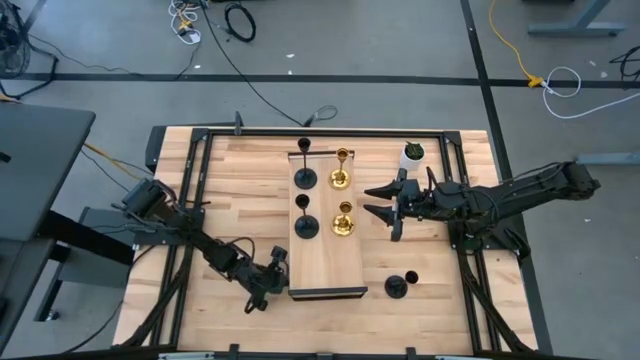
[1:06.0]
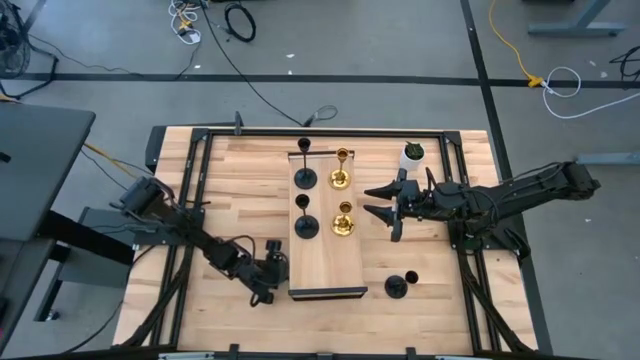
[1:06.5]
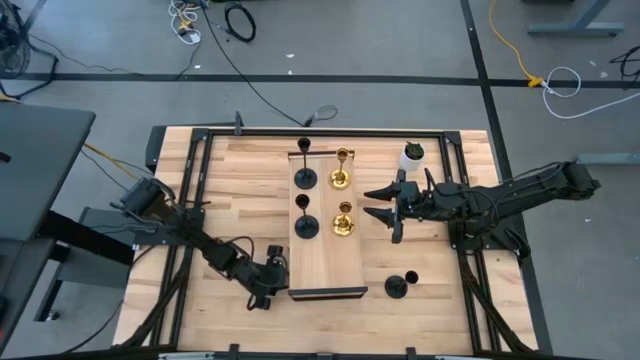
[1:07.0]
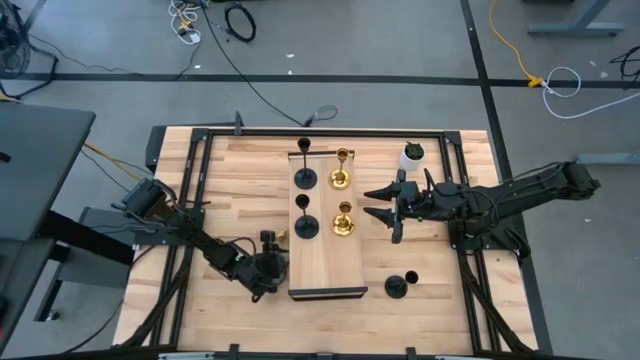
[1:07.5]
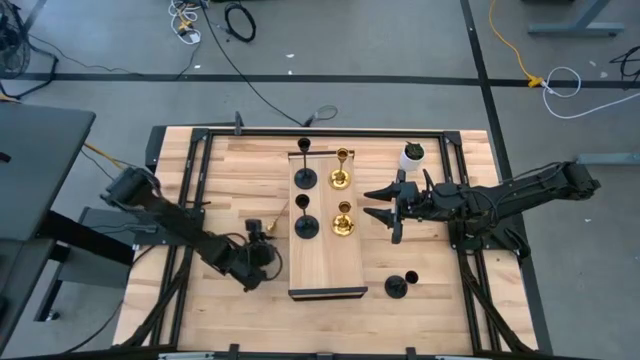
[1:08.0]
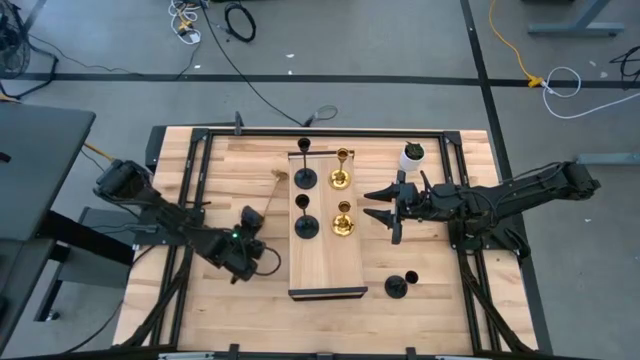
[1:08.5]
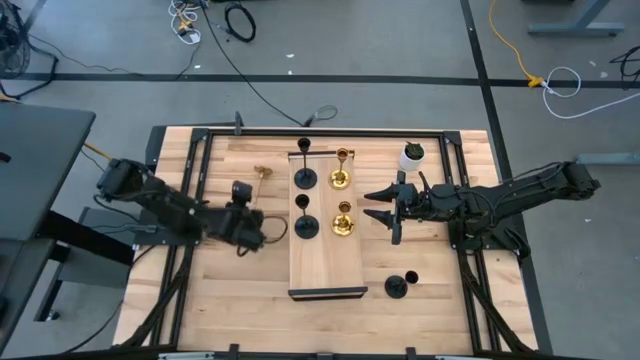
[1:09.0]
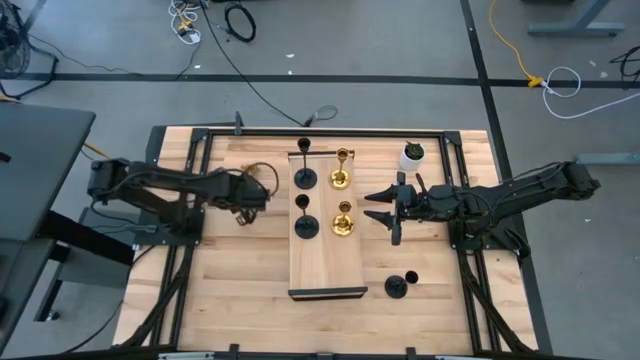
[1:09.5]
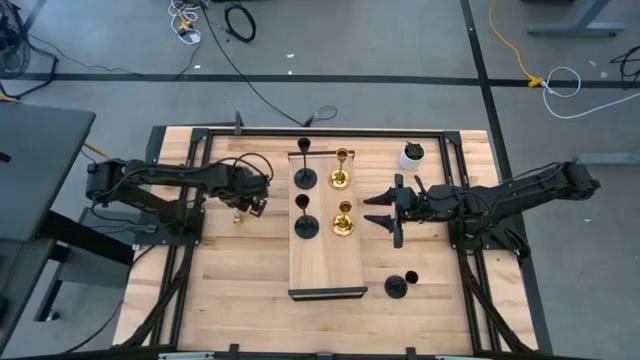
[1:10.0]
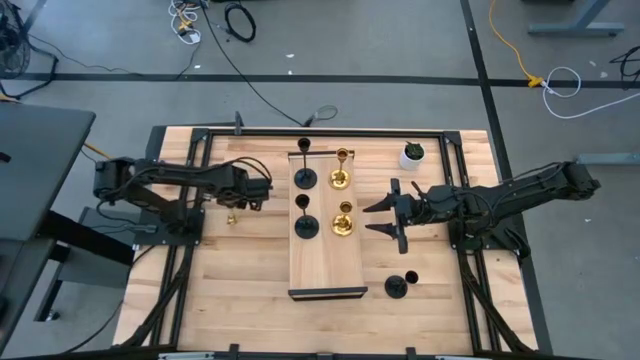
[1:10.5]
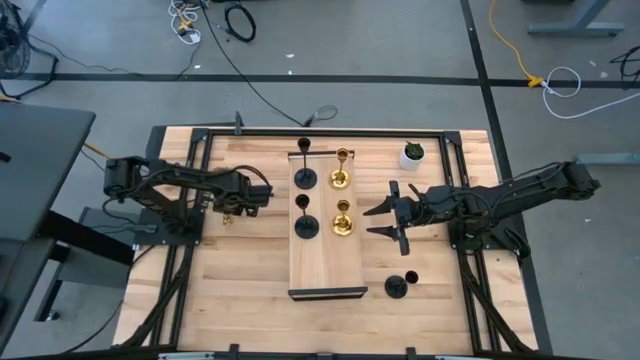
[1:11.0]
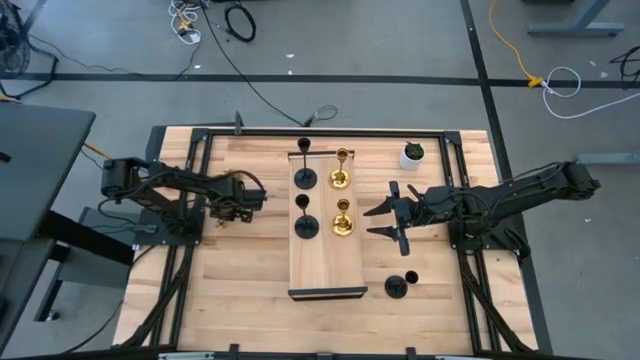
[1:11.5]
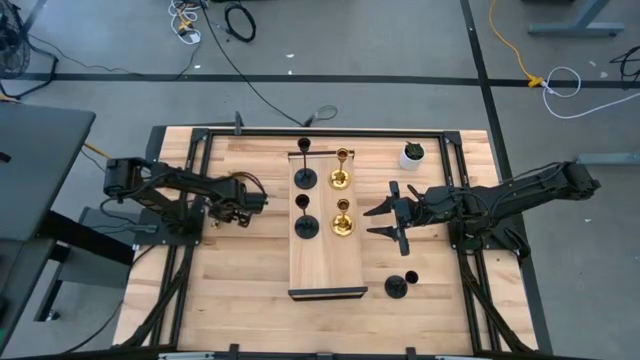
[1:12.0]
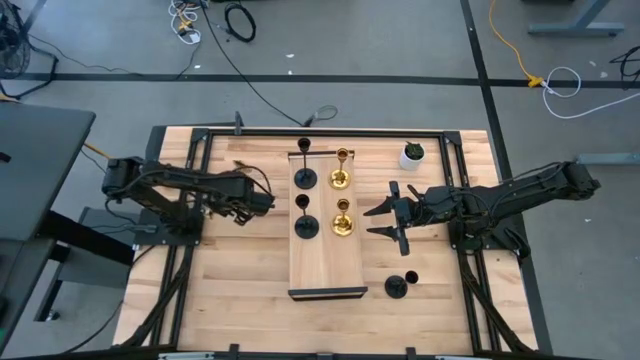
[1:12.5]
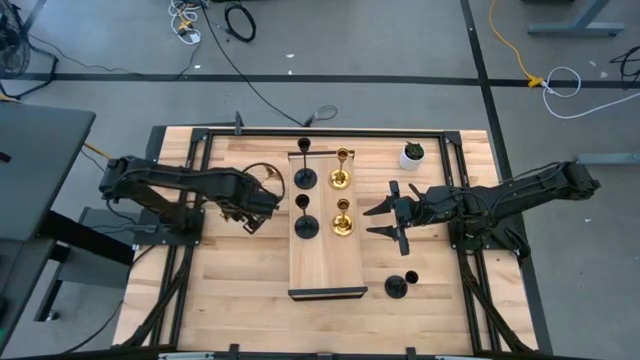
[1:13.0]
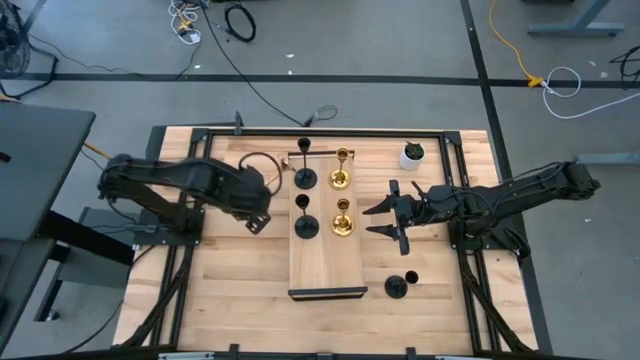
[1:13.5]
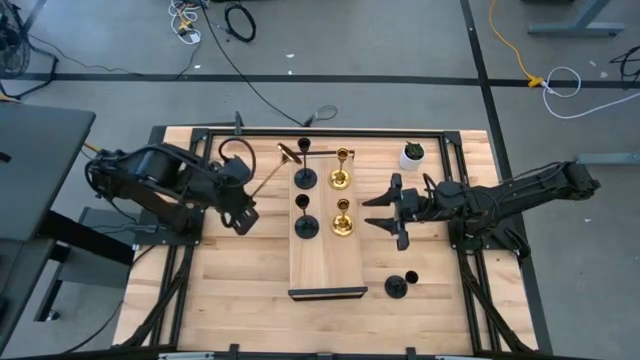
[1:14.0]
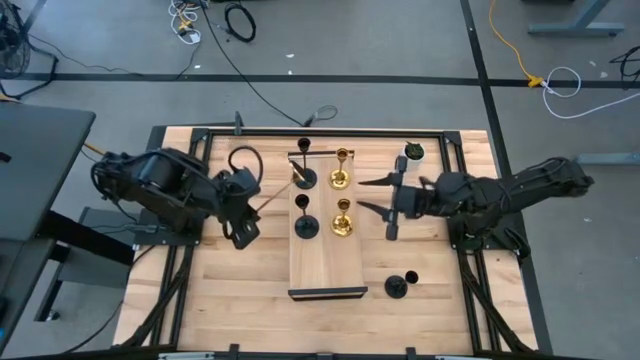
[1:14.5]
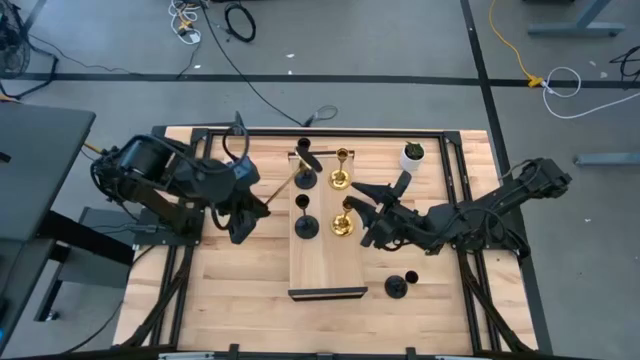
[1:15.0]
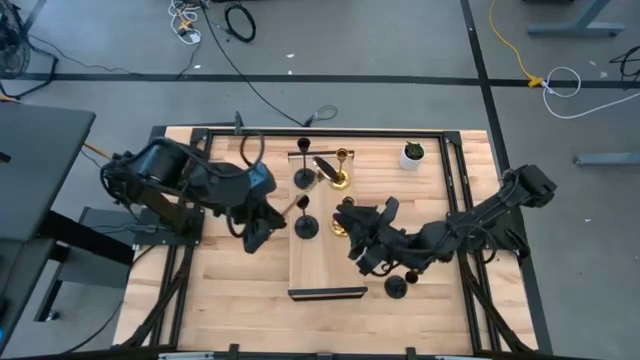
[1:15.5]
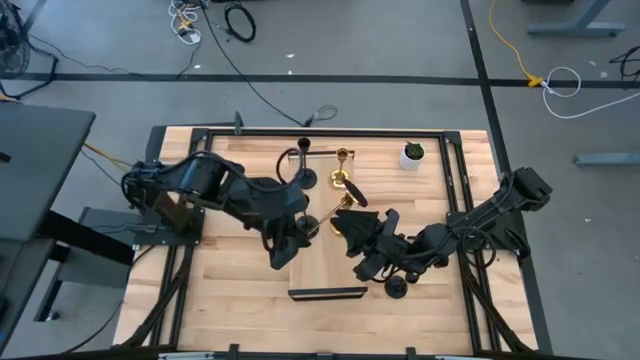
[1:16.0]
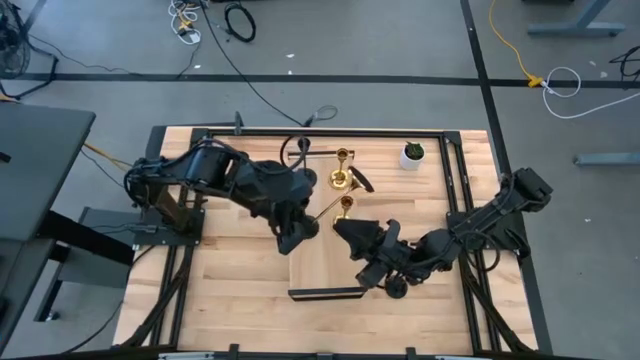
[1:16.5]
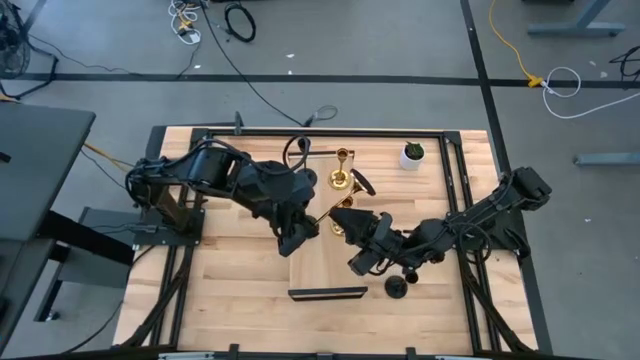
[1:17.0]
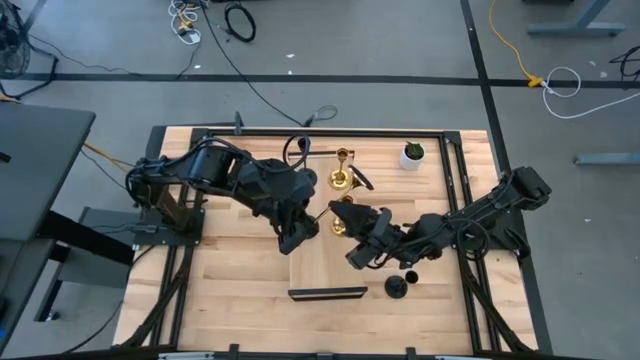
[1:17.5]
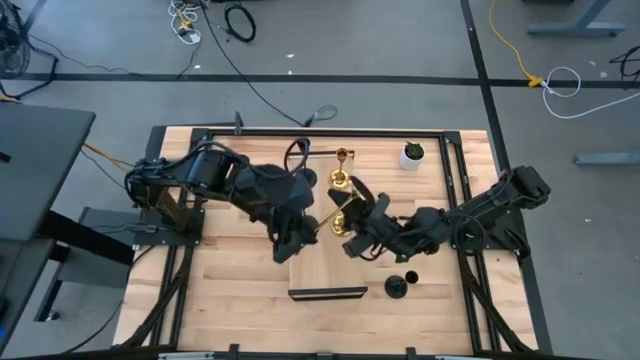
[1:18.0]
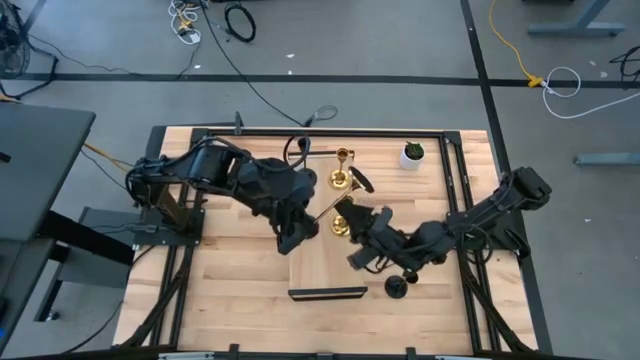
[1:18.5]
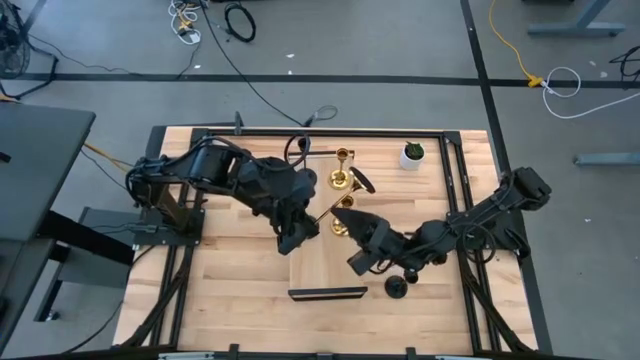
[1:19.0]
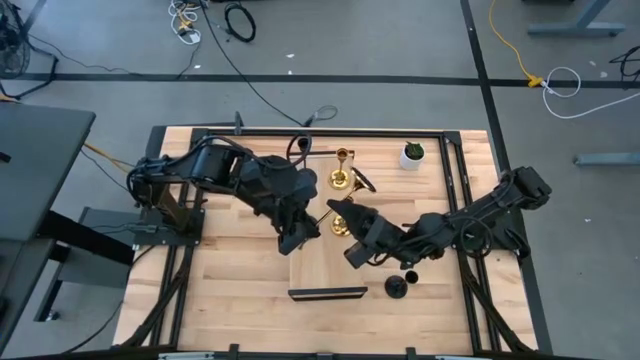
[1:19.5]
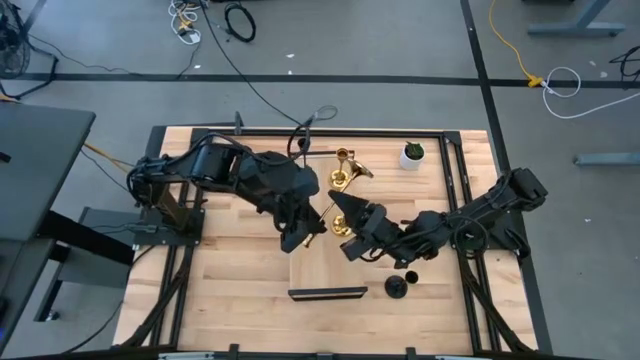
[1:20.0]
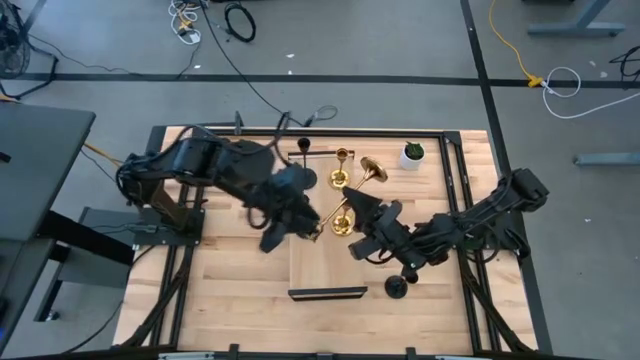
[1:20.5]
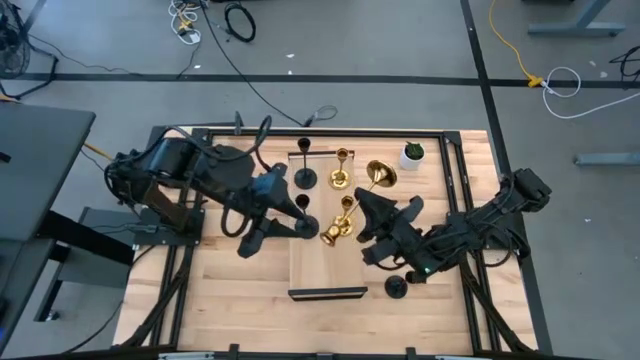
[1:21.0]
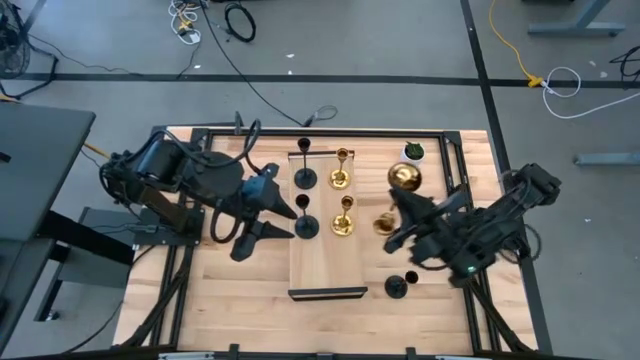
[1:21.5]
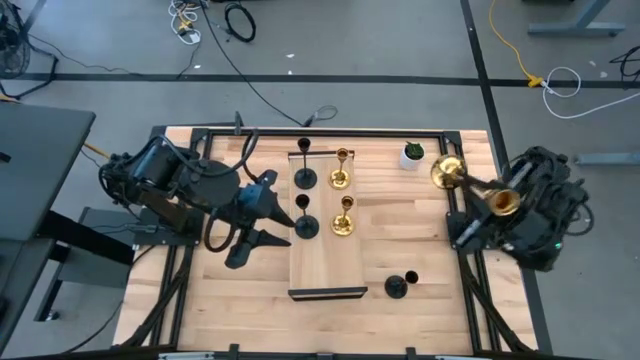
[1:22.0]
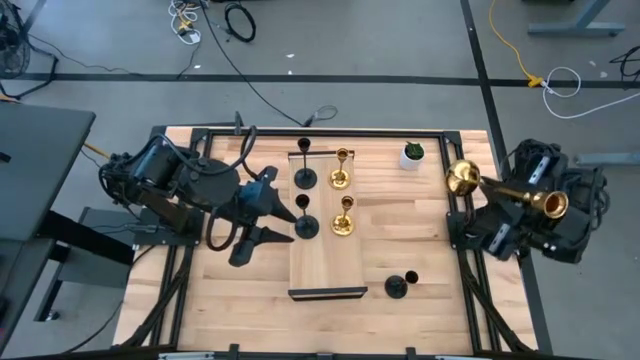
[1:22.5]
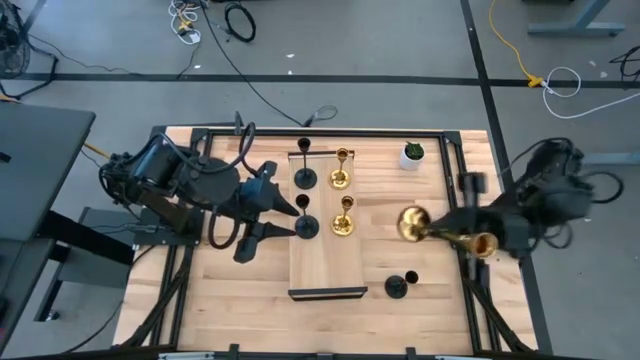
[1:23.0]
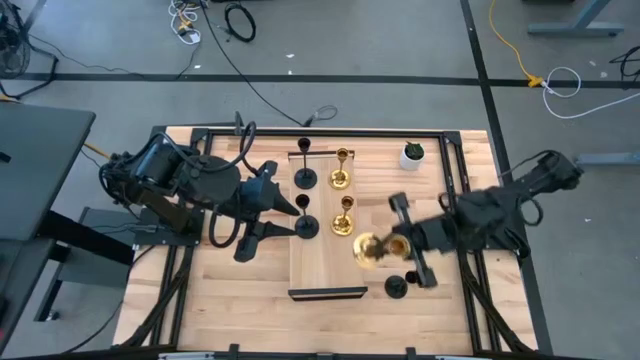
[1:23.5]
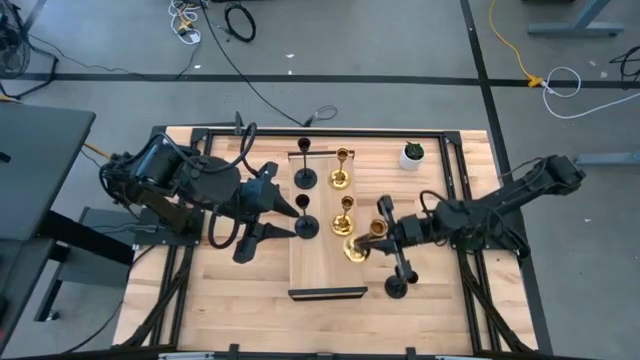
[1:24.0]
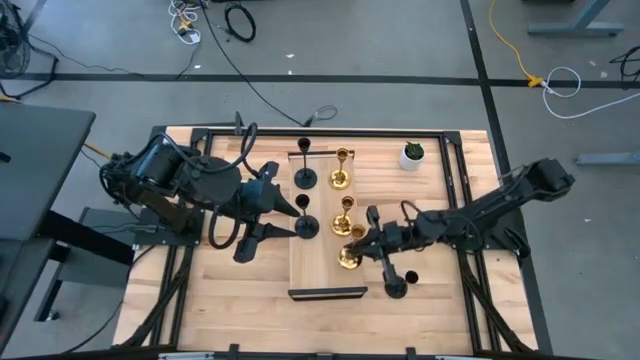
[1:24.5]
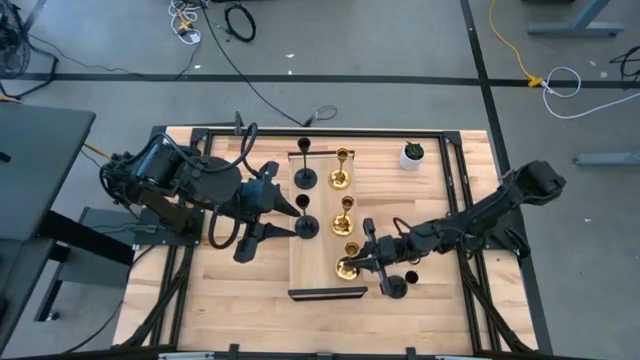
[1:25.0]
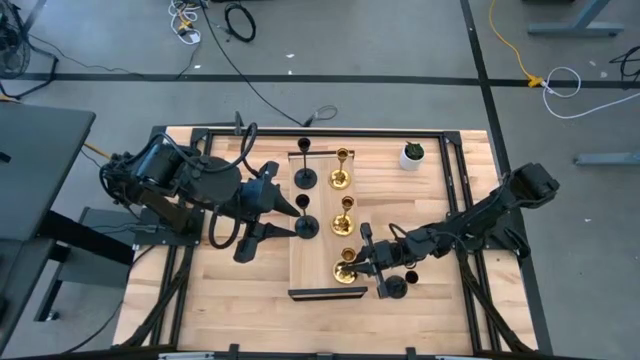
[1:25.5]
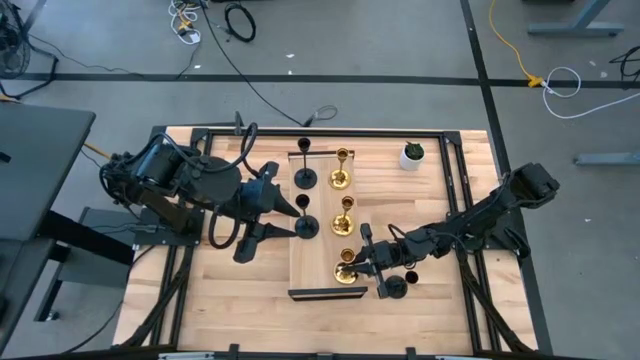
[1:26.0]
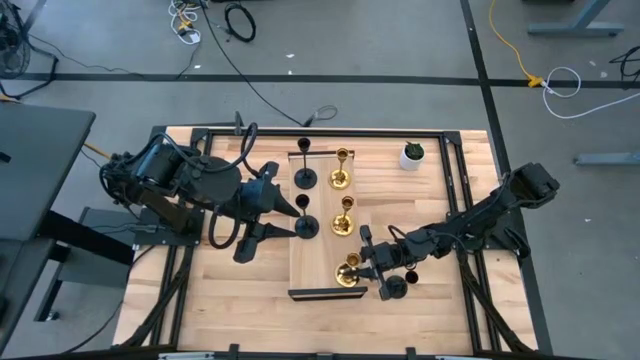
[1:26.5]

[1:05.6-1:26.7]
Task: Pick & Place candle stick holders
Put the golden candle holder on the shelf

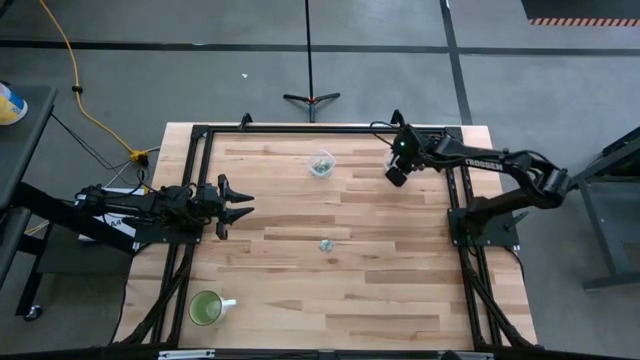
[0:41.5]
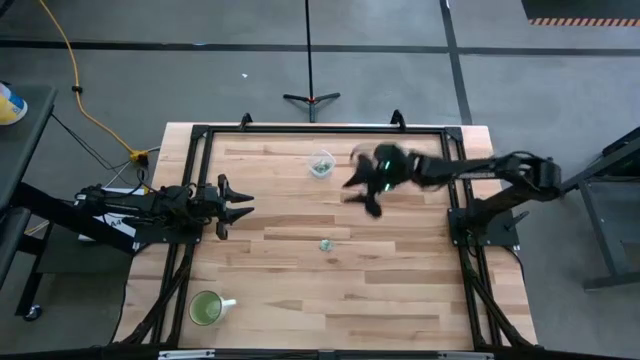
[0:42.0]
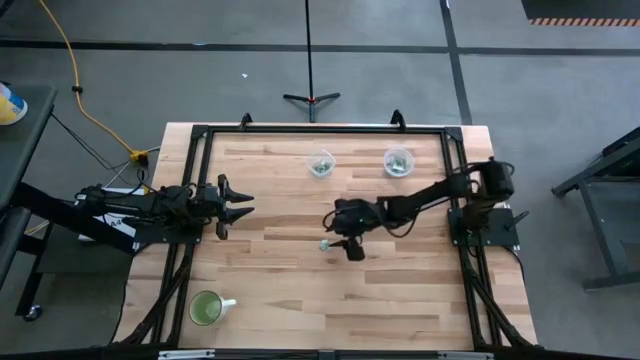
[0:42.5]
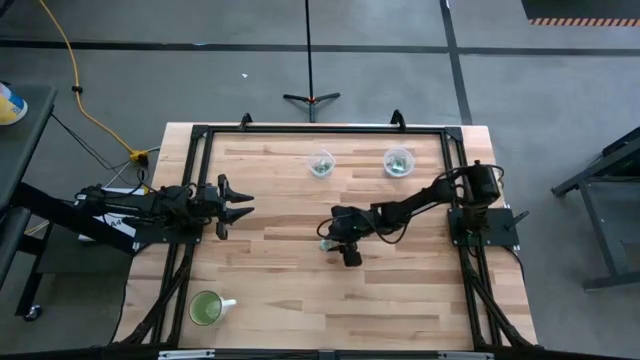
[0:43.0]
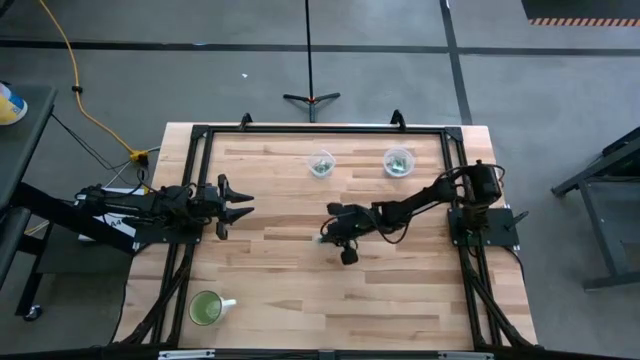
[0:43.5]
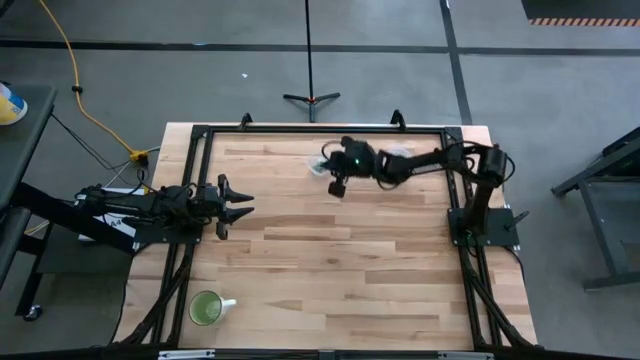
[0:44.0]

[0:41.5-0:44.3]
Task: Pick and place Stevia / Truvia into bins
Put the stevia packet into the left transparent container
